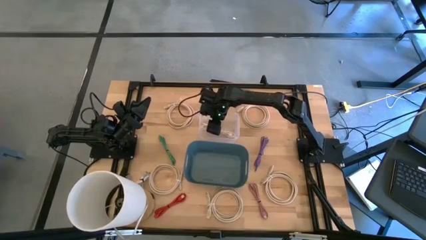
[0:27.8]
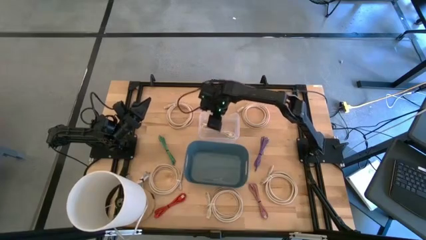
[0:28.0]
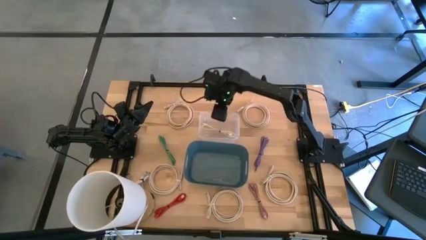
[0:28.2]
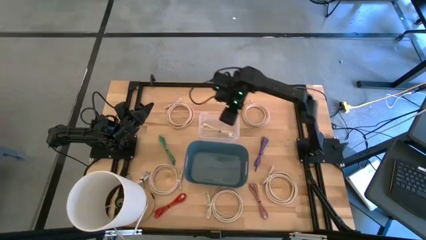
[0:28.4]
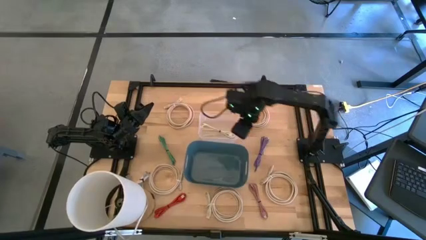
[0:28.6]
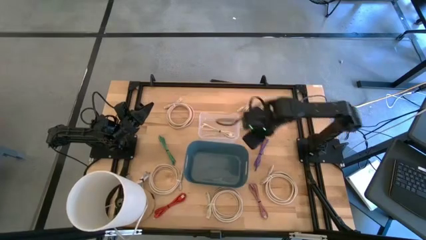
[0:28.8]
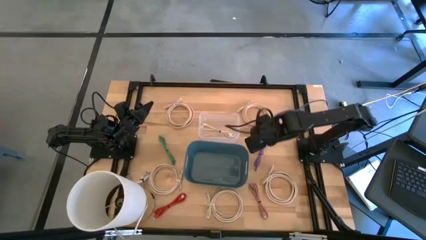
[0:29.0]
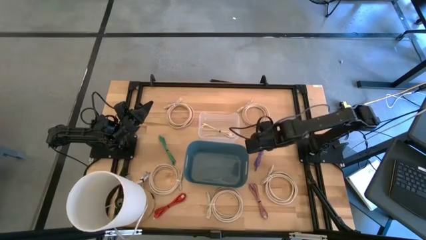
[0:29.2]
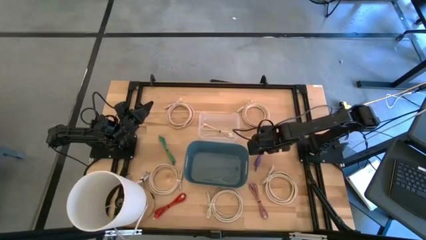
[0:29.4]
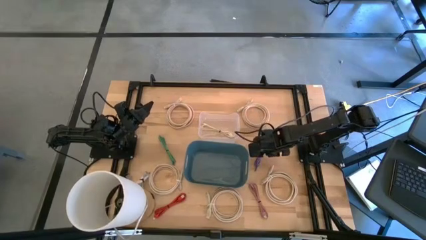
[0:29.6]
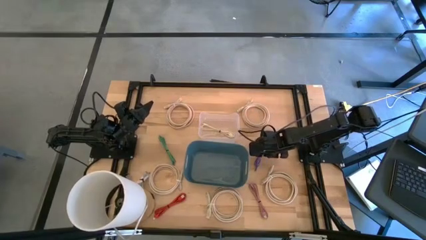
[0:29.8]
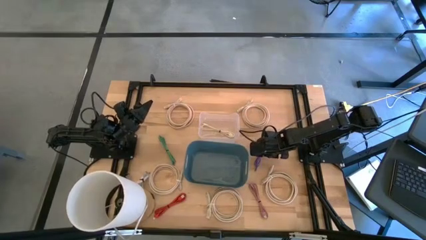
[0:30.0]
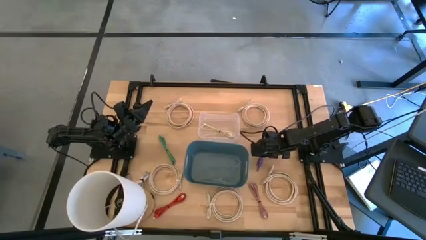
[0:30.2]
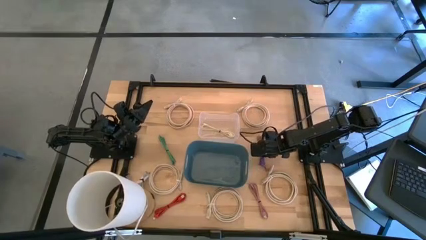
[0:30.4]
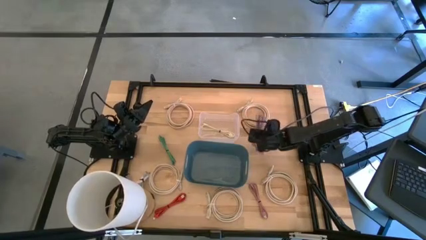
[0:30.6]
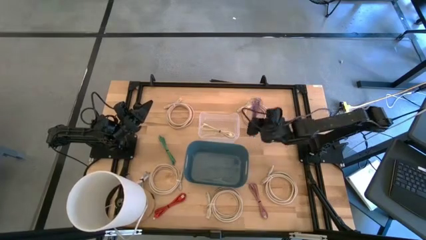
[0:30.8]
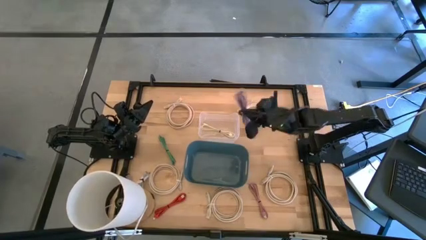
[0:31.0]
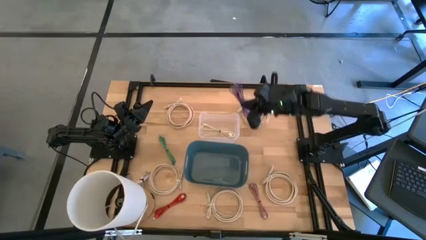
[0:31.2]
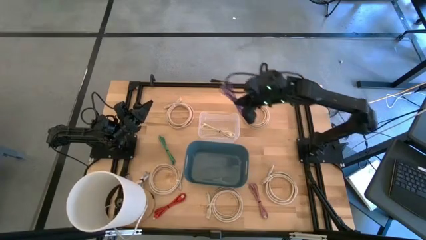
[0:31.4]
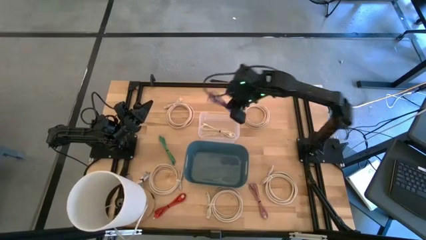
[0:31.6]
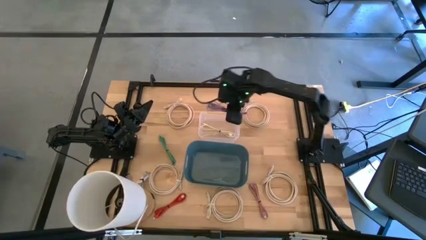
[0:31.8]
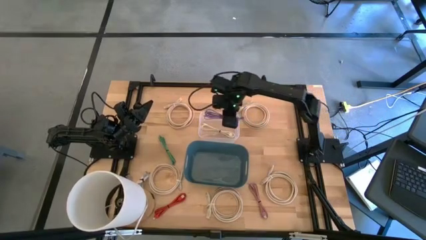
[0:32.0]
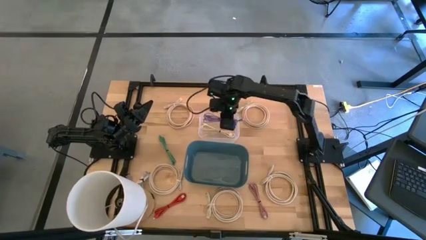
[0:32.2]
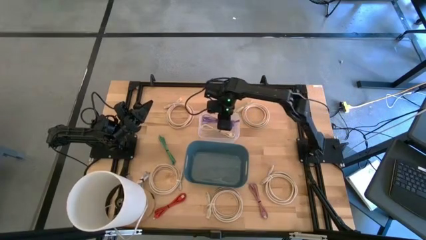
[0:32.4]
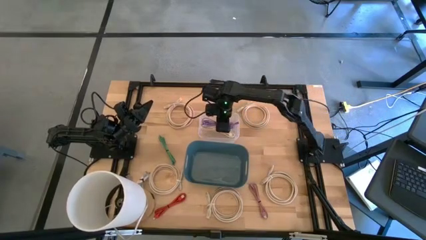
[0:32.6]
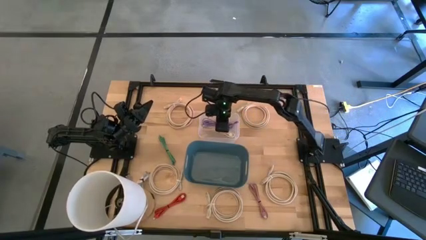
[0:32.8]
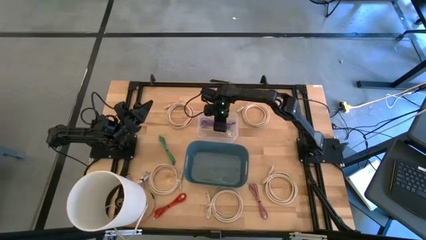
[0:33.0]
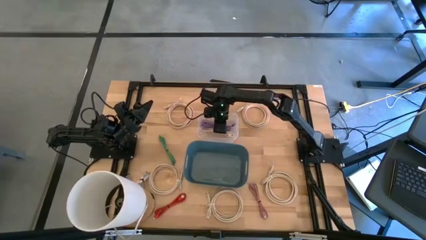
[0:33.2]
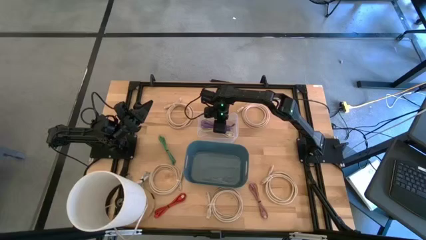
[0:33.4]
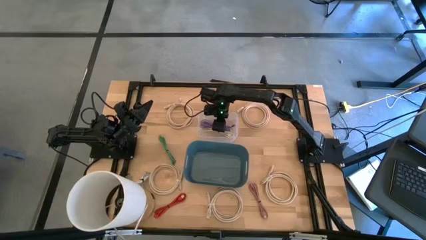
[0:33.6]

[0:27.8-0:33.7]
Put the violet charger cable into the transparent bin

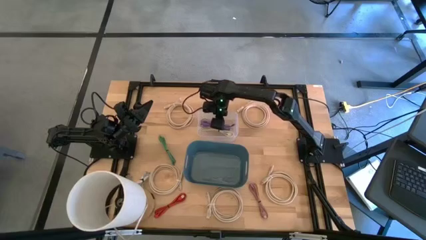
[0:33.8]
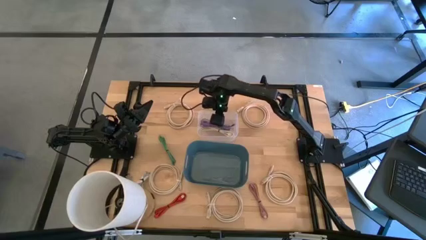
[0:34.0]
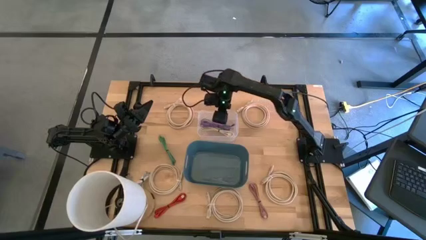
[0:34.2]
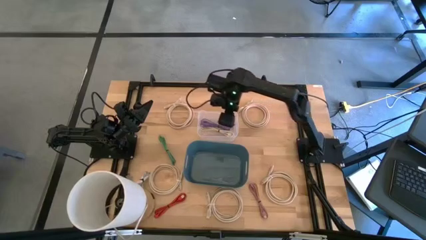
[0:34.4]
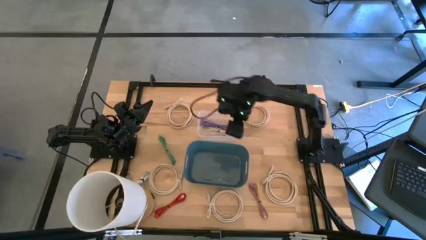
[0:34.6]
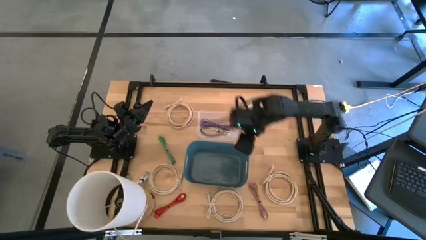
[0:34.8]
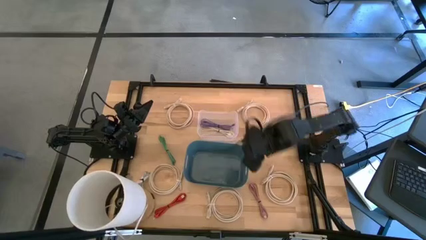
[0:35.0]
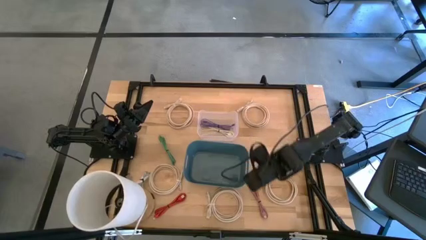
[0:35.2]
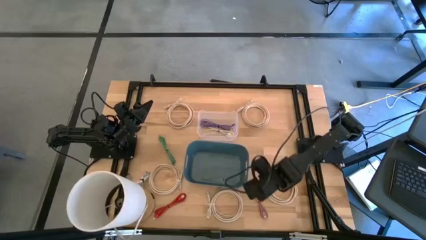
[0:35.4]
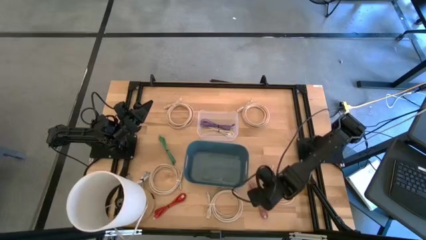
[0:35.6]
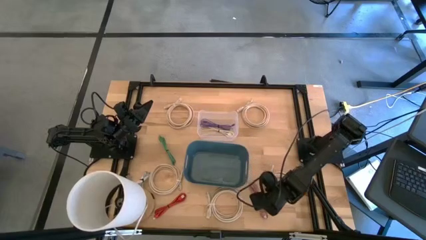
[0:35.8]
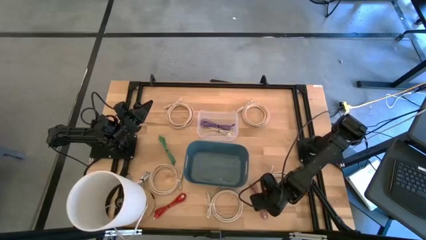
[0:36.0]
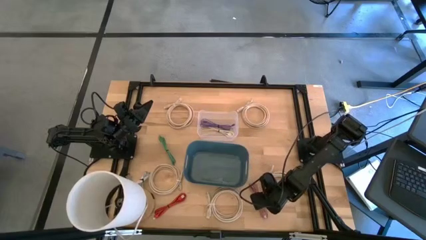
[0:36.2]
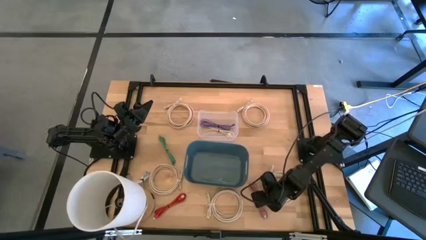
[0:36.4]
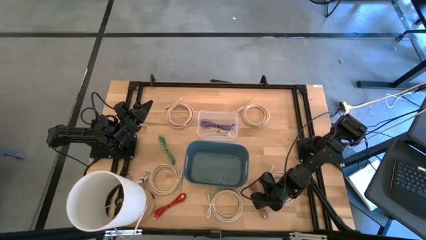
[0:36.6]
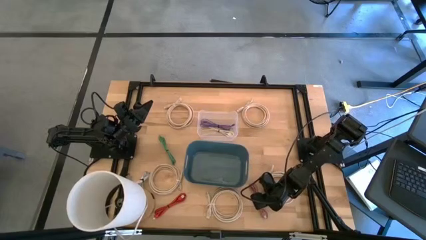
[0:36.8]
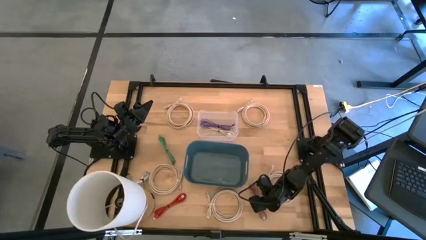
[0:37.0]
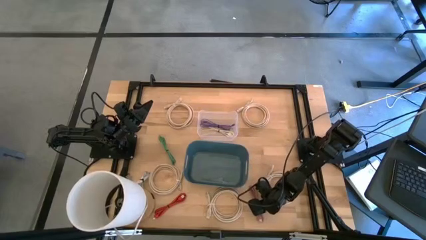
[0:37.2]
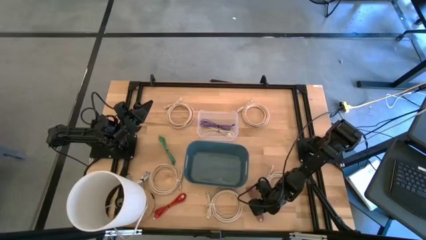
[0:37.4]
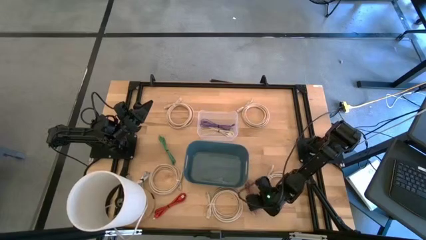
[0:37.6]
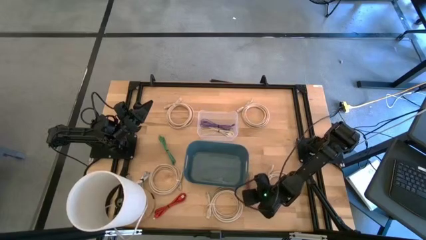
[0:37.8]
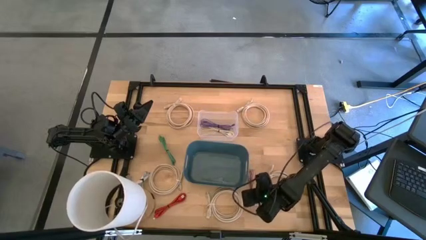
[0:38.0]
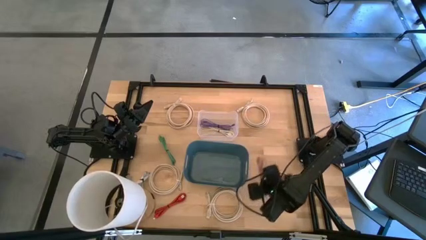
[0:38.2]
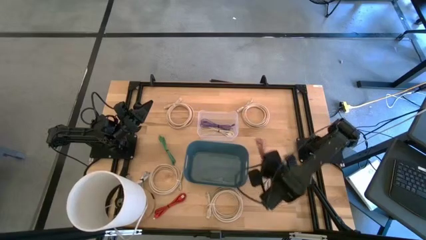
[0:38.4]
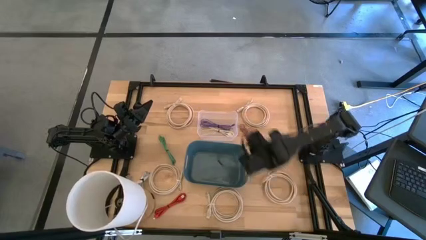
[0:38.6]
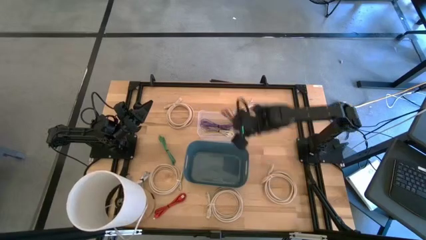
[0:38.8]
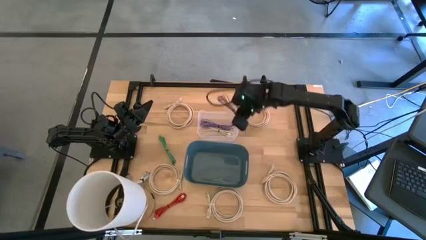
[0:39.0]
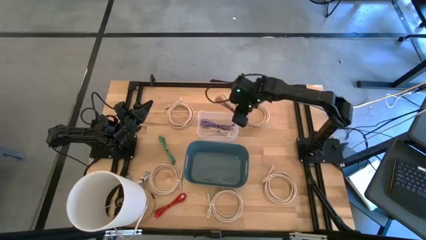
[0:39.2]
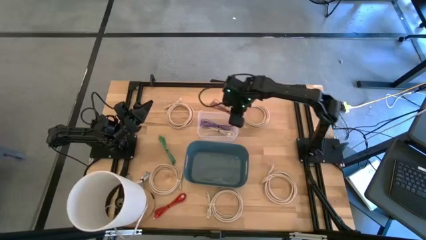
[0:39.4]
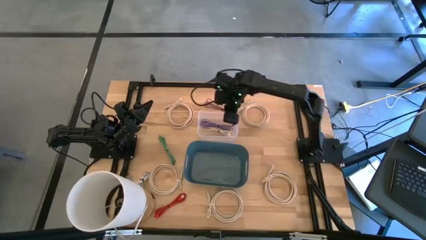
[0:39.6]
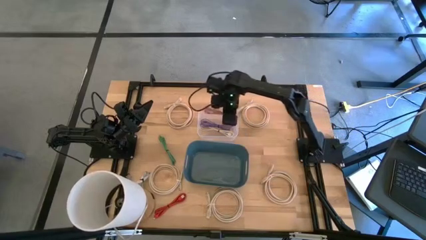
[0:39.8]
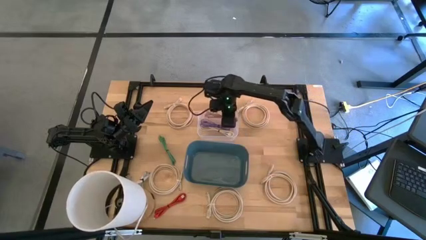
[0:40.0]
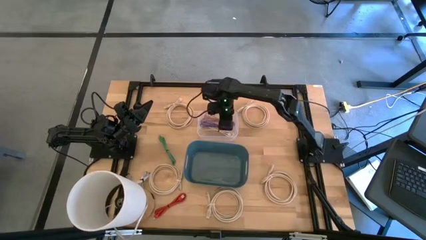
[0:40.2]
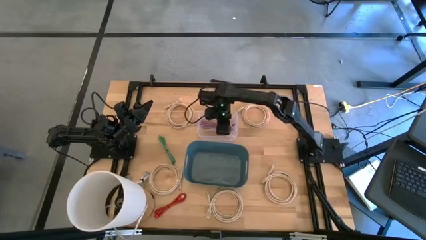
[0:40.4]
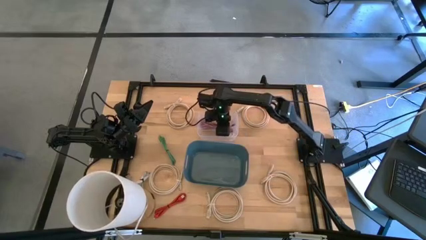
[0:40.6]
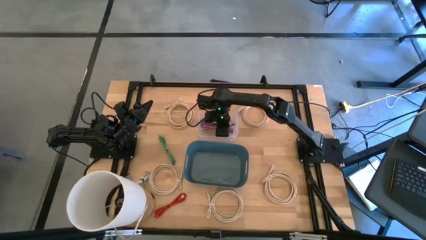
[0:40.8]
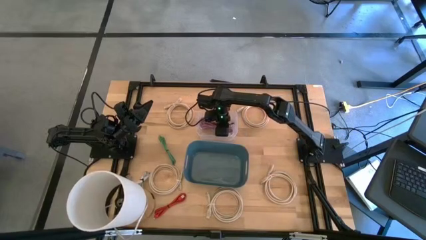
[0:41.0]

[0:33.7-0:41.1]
Put the pink charger cable into the transparent bin

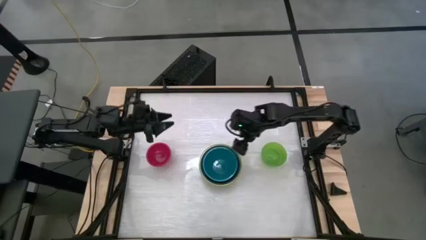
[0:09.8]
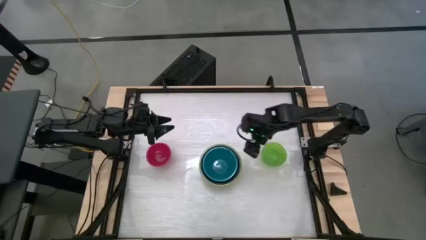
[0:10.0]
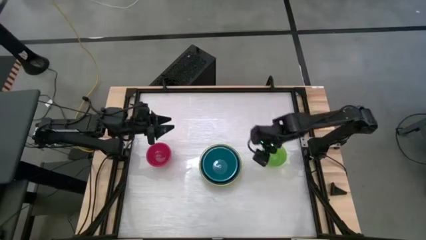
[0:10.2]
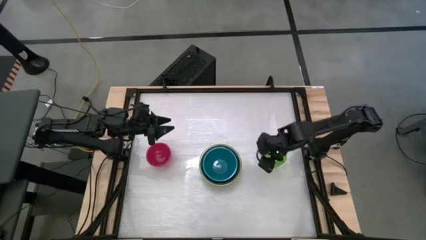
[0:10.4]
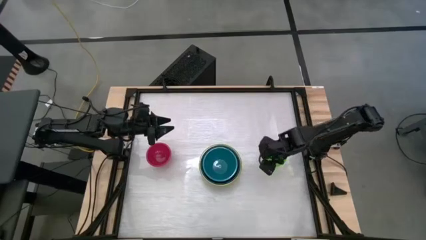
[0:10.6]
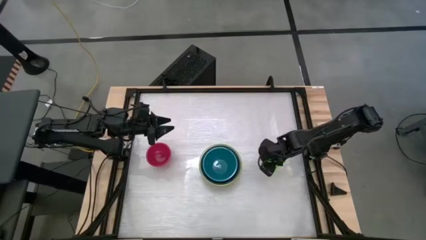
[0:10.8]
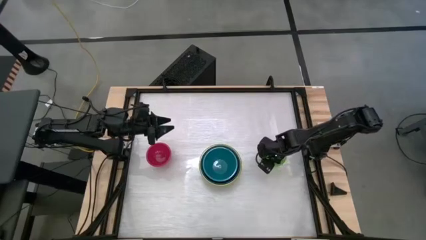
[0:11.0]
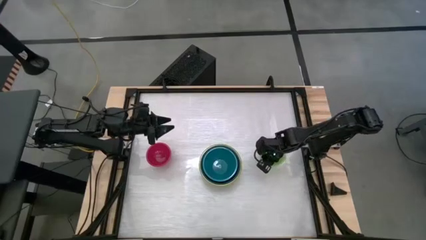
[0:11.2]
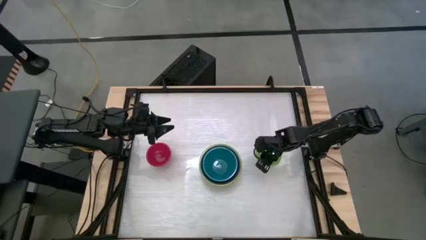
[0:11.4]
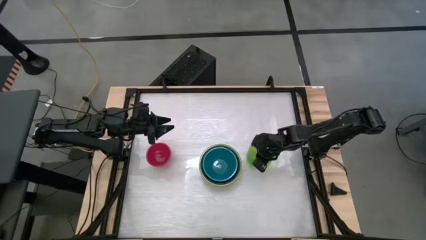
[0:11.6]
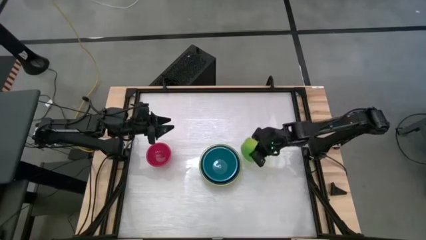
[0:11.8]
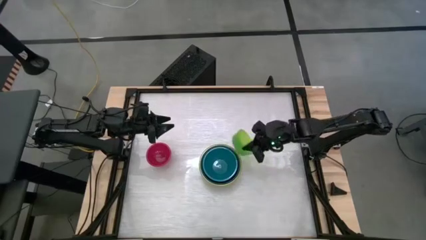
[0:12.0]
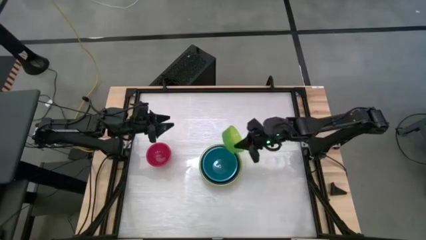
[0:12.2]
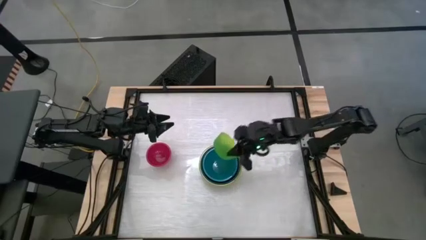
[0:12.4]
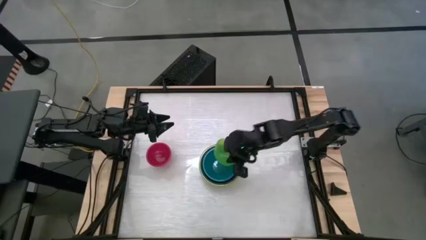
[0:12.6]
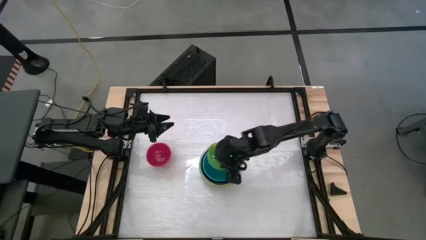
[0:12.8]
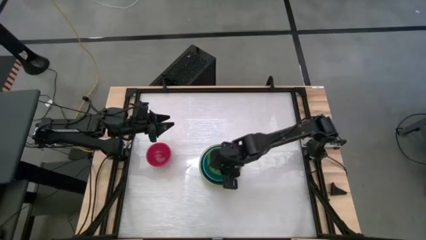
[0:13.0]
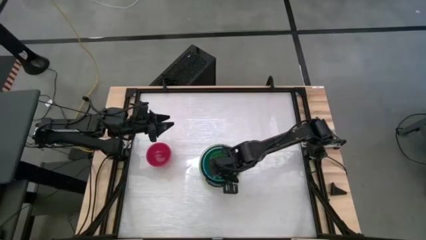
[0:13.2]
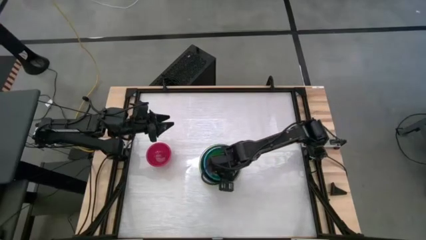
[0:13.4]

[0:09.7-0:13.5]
Stack the transparent green bowl on top of the blue bowl
